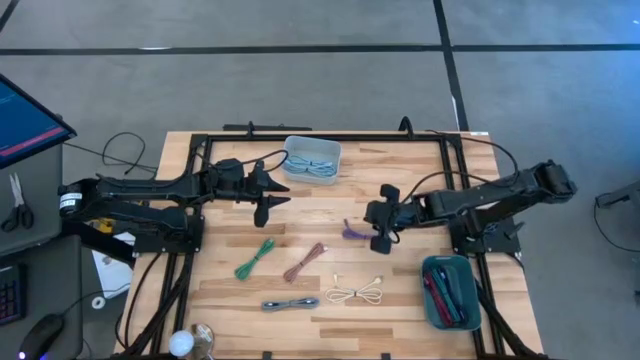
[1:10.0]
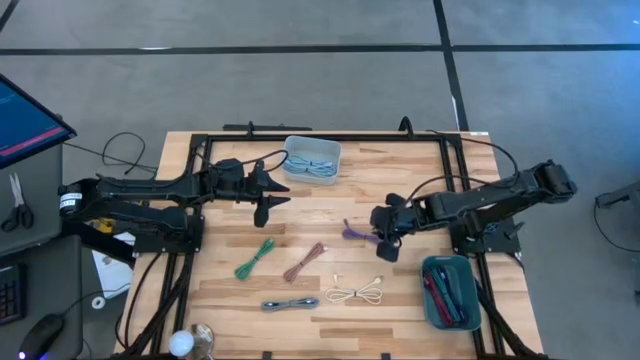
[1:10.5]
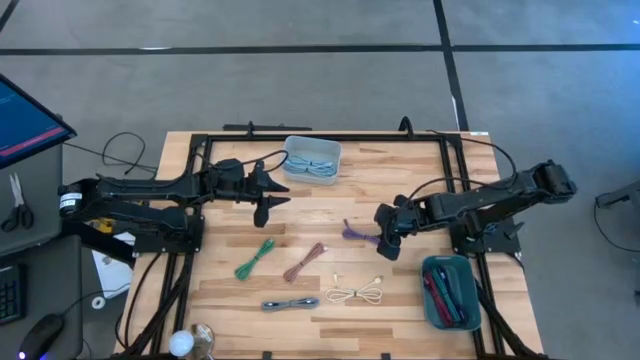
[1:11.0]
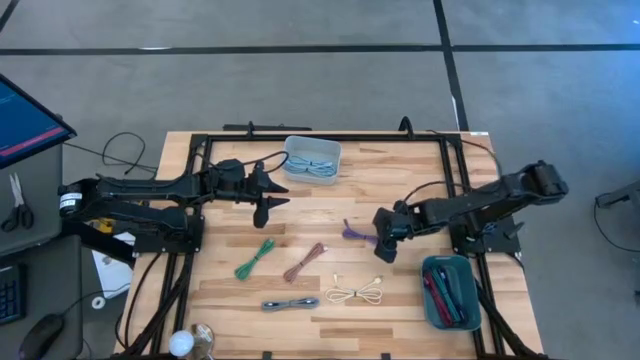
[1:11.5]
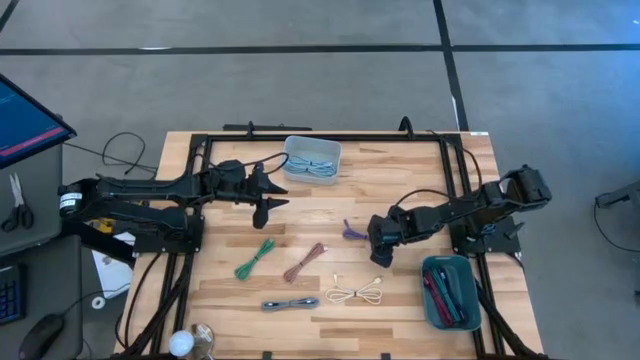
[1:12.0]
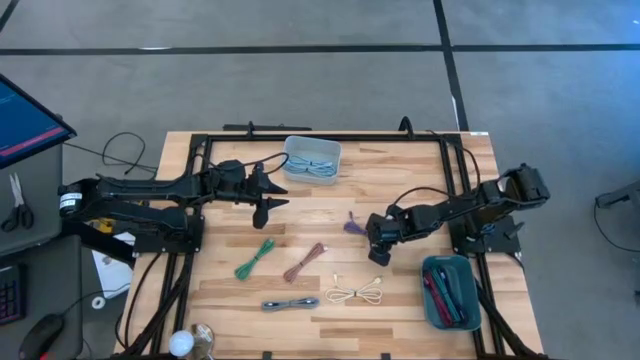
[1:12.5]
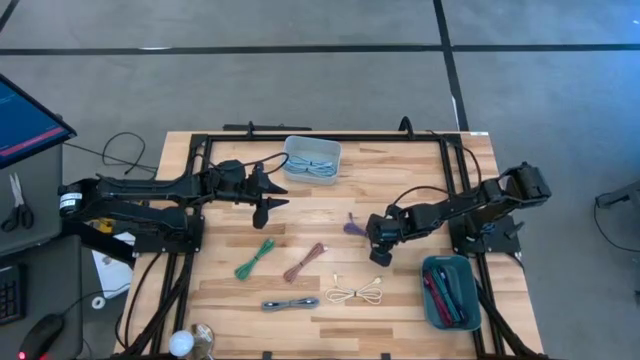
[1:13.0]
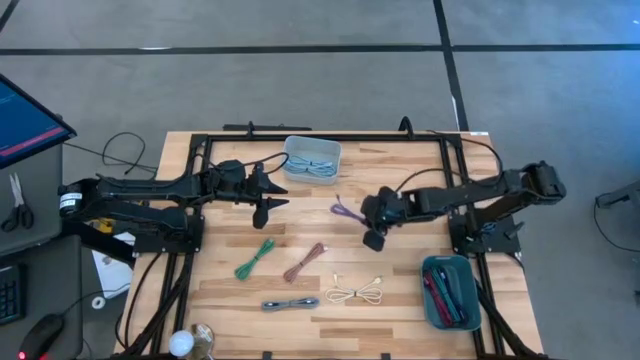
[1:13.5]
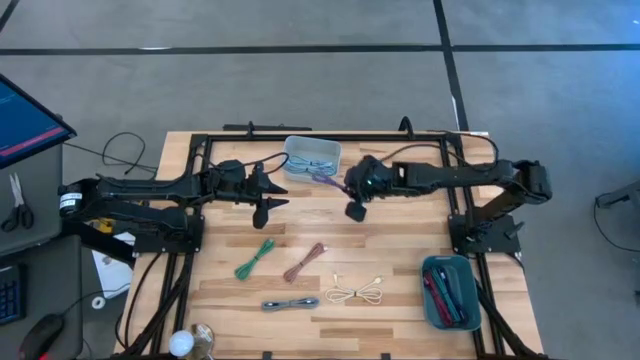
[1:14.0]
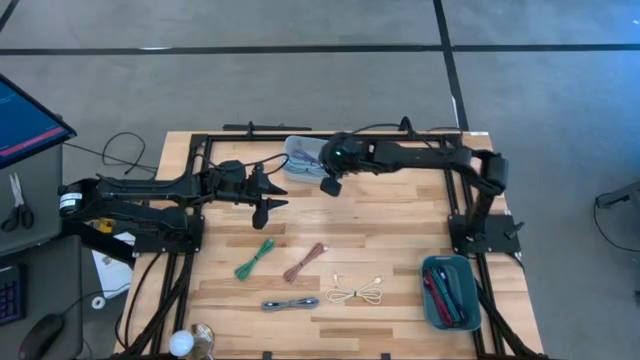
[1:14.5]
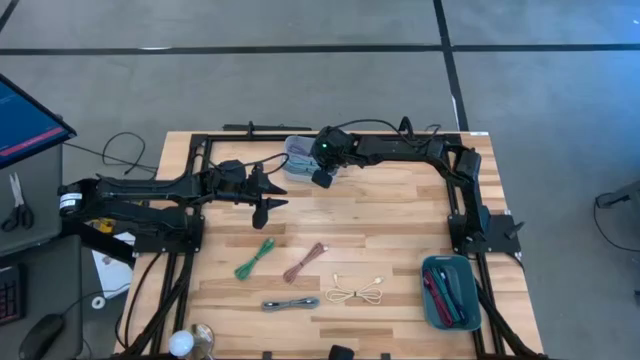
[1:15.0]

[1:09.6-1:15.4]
Task: Pick & Place USB Port
Put the violet charger cable into the gray bin

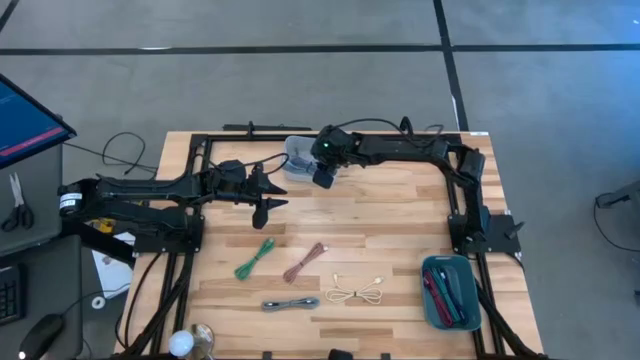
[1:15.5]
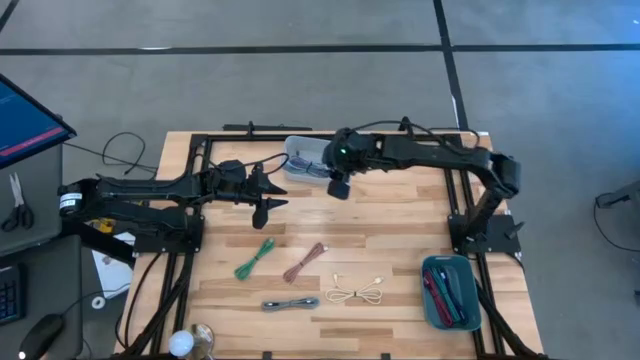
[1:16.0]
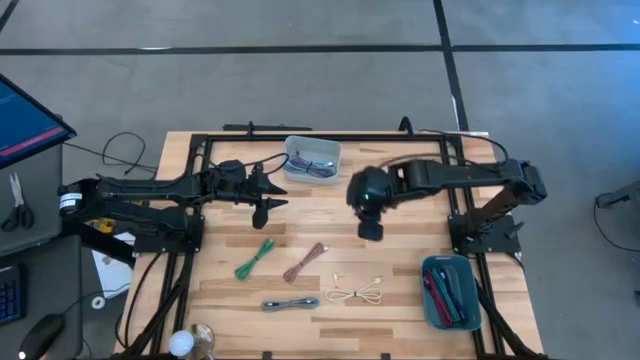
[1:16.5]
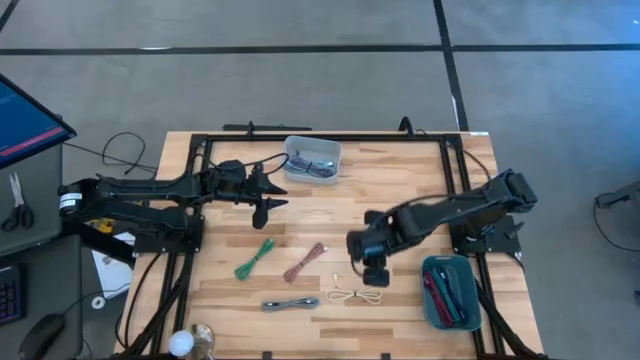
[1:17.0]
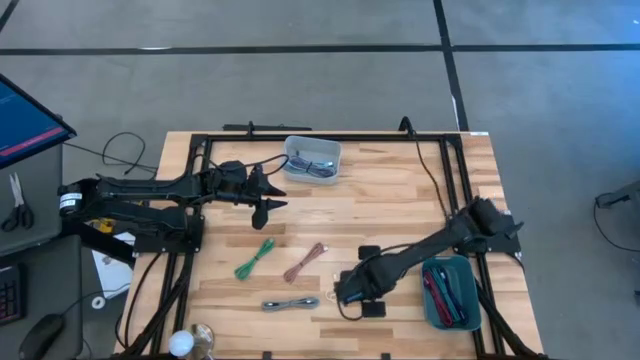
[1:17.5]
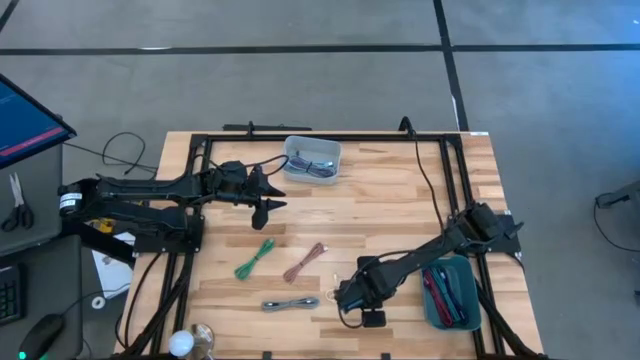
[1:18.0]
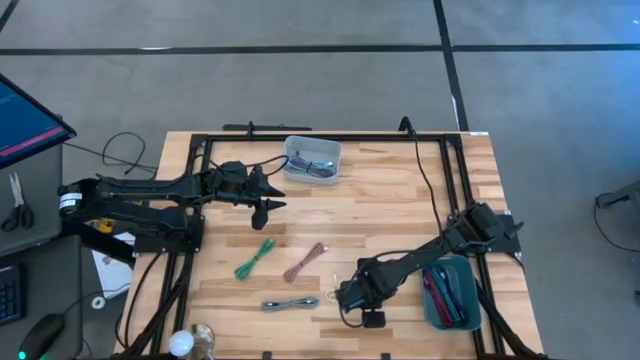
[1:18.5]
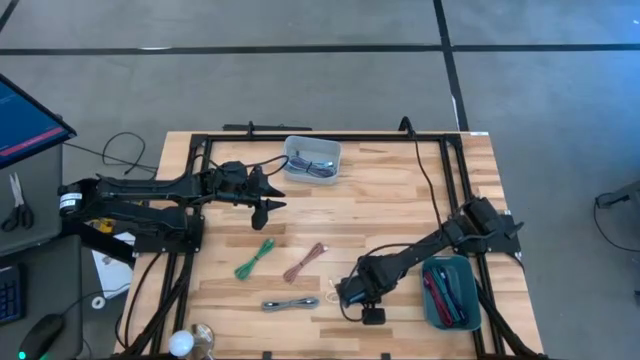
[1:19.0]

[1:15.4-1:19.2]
Put the white charger cable into the gray bin

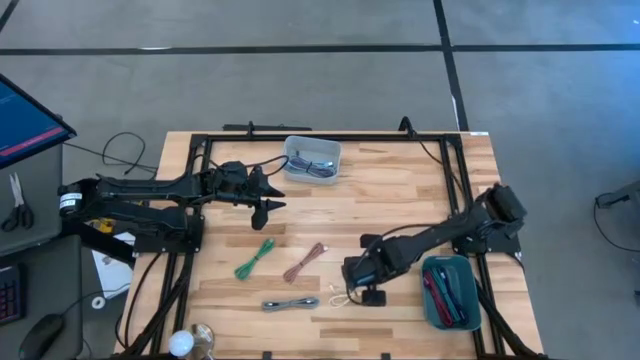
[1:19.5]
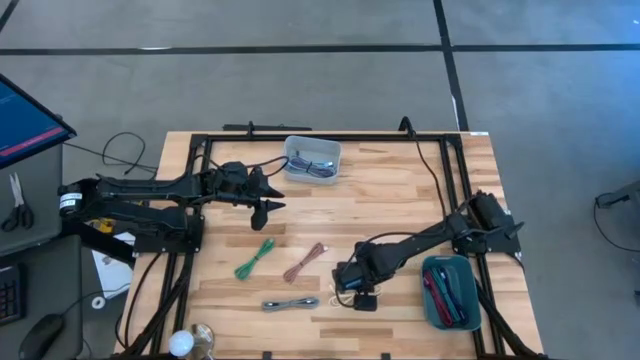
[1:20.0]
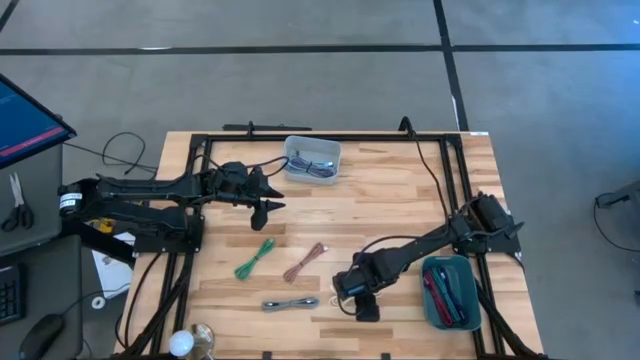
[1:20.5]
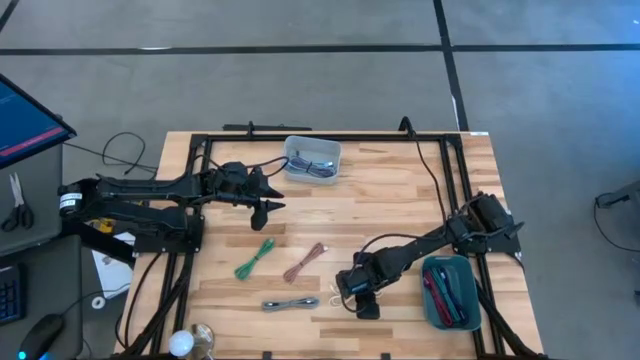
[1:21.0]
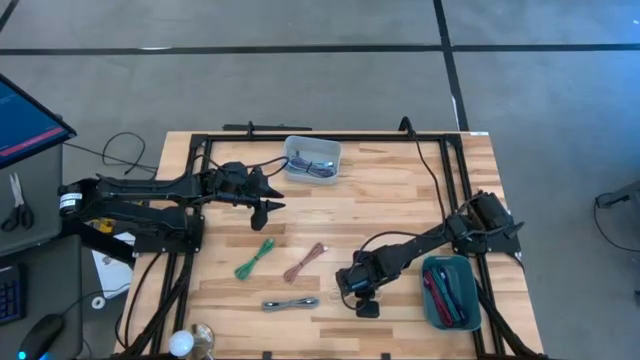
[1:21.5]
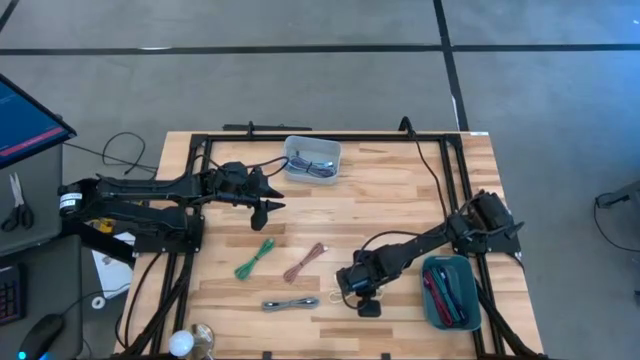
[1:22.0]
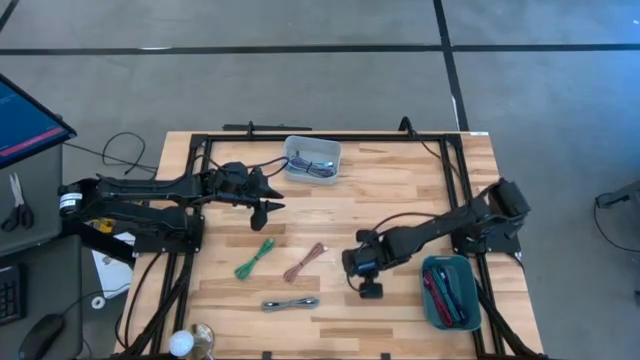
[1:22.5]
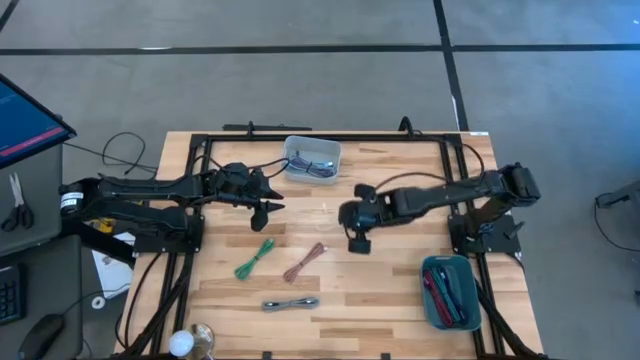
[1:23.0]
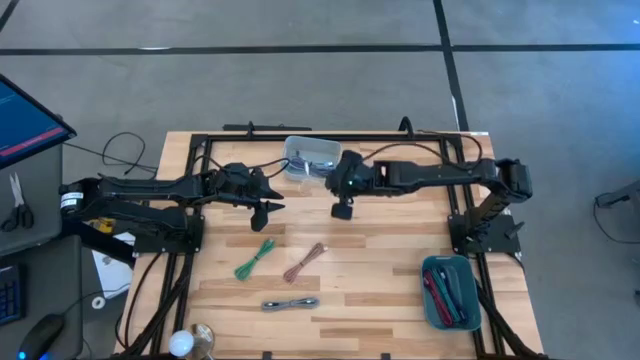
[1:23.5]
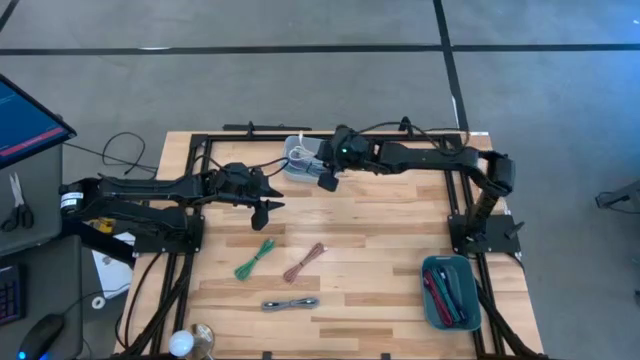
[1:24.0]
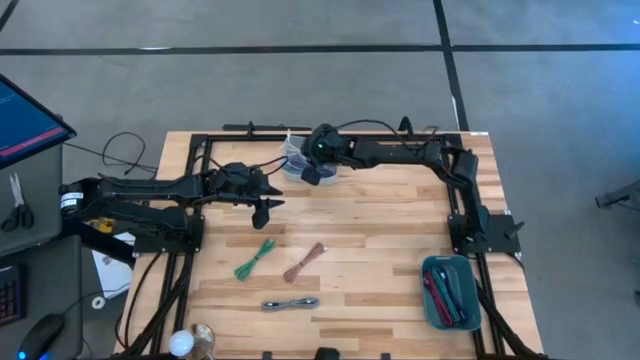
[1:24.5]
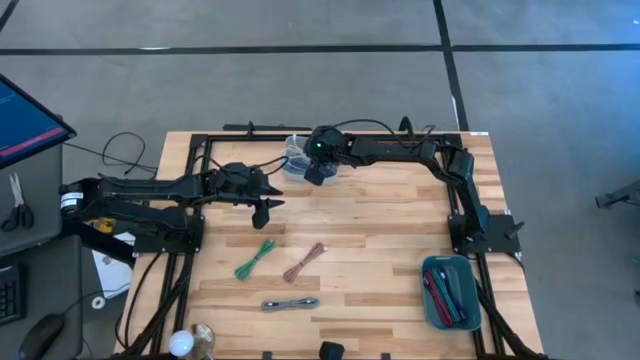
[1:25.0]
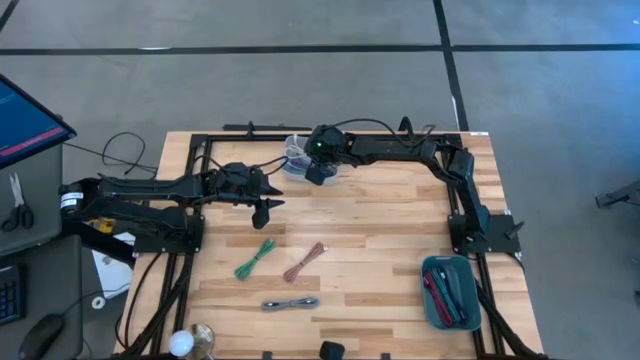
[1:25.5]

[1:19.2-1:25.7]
Put the white charger cable into the gray bin

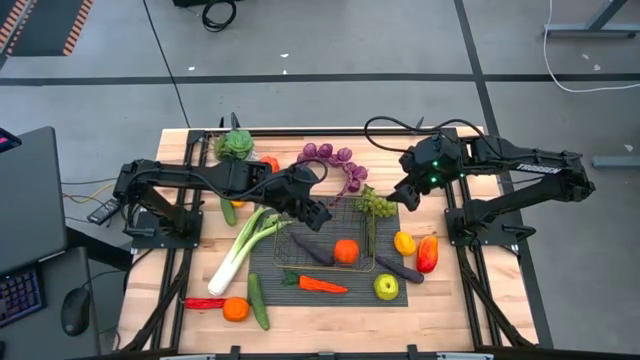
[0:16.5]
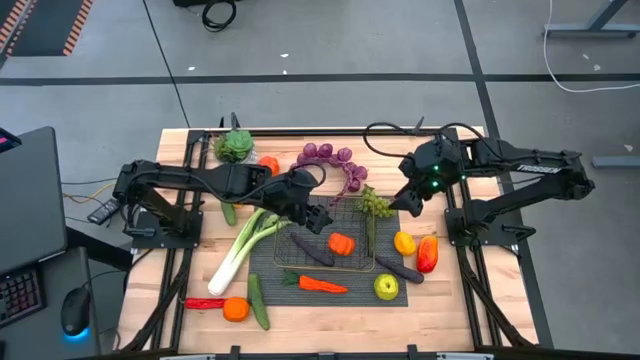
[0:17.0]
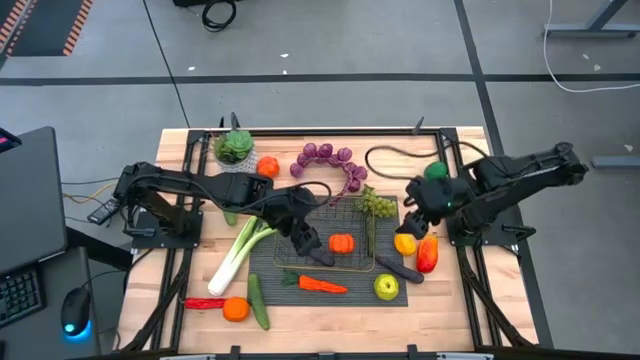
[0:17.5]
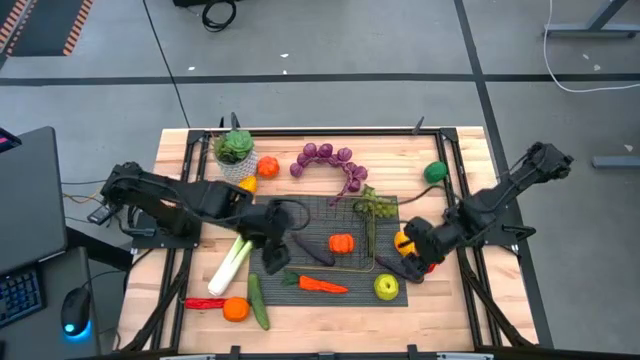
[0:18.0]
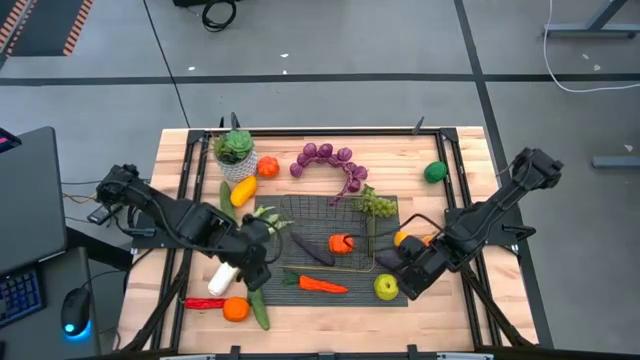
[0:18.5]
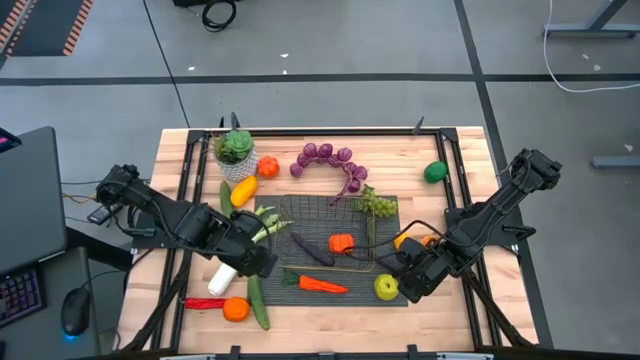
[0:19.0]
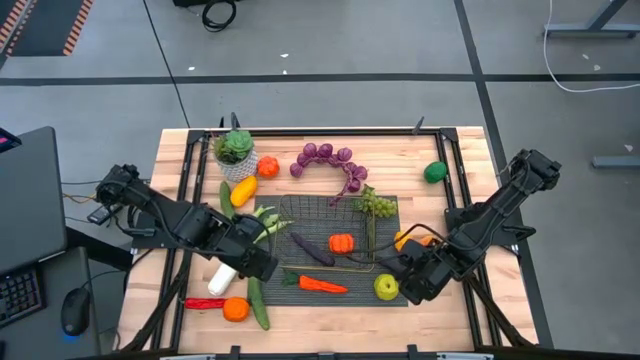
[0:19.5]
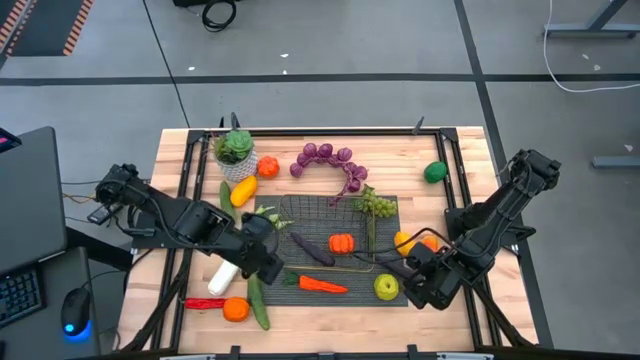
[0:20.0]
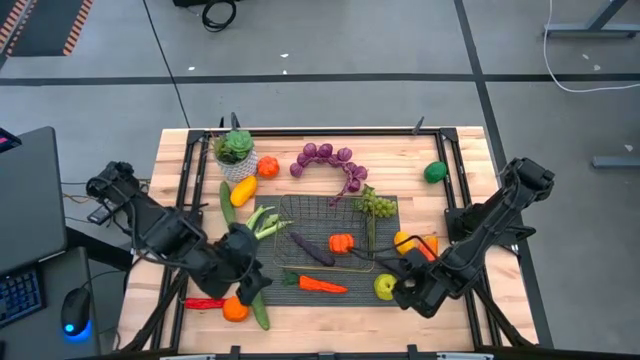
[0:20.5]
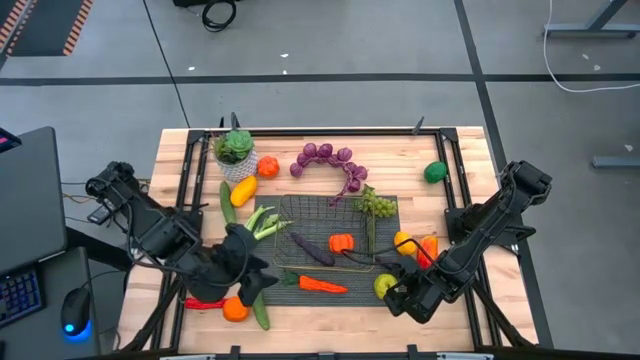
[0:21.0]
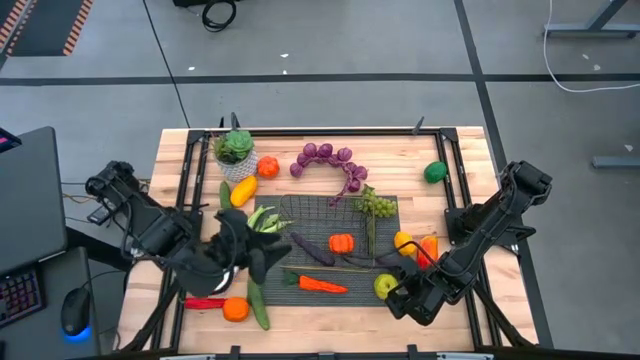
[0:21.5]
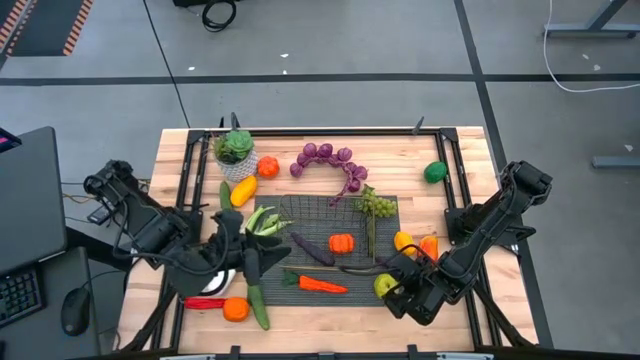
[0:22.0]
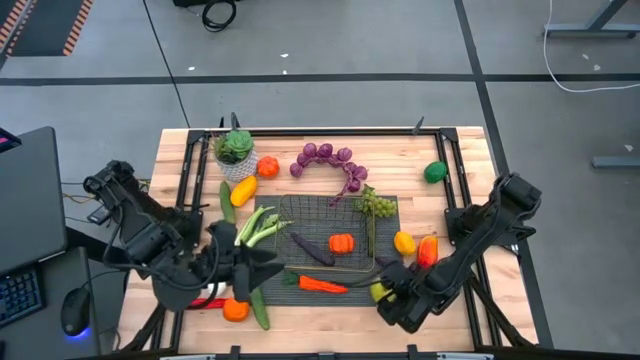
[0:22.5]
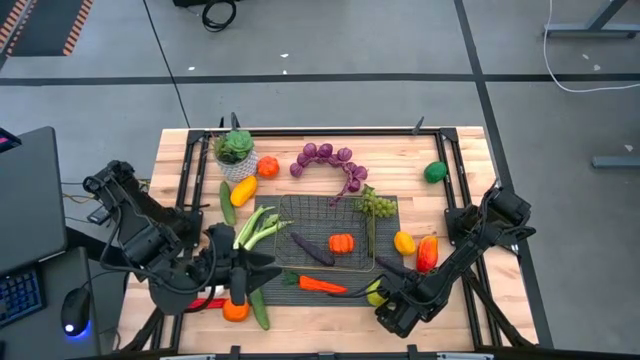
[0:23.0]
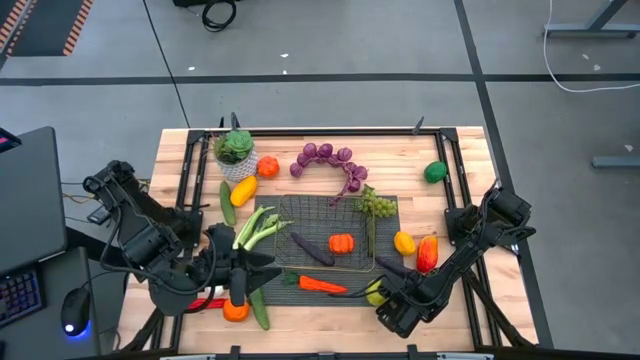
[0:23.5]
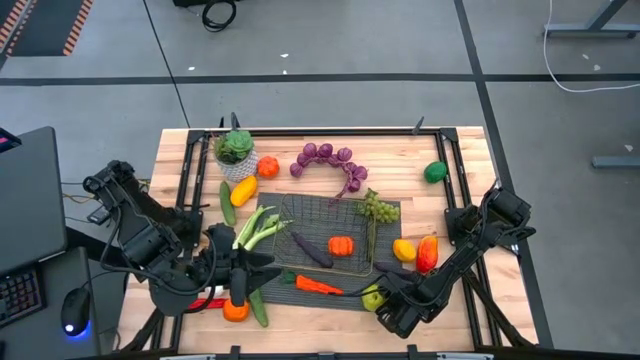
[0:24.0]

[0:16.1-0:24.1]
Task: Build produce basket
Put the green apple into the gold wire basket
